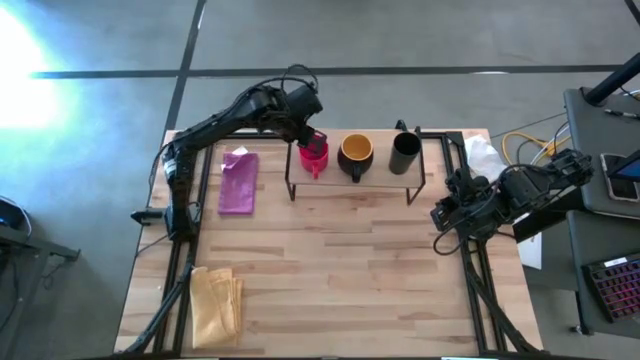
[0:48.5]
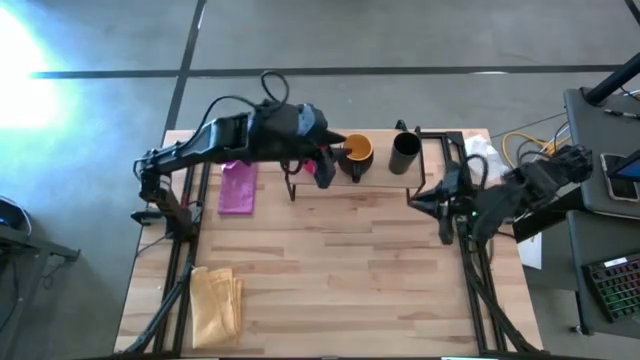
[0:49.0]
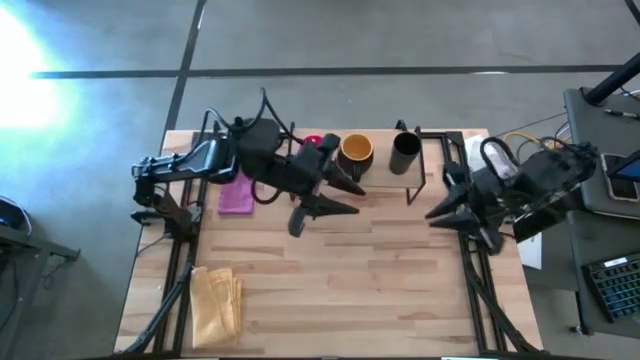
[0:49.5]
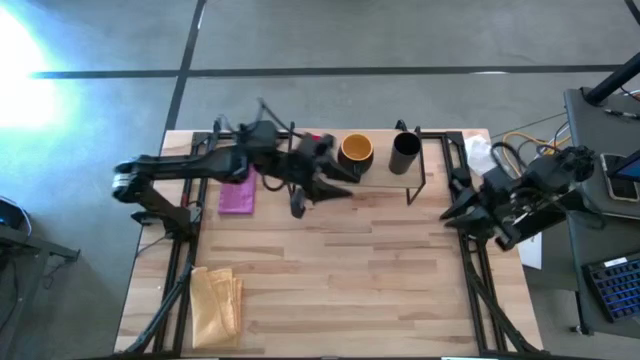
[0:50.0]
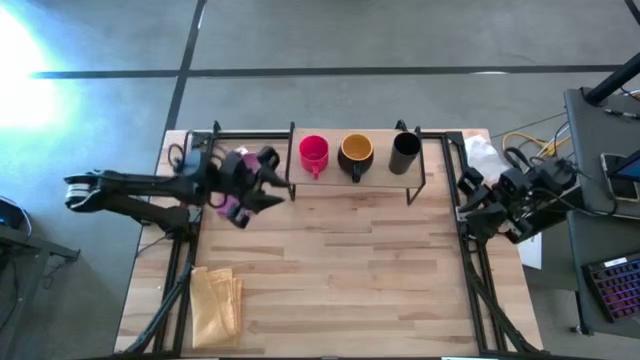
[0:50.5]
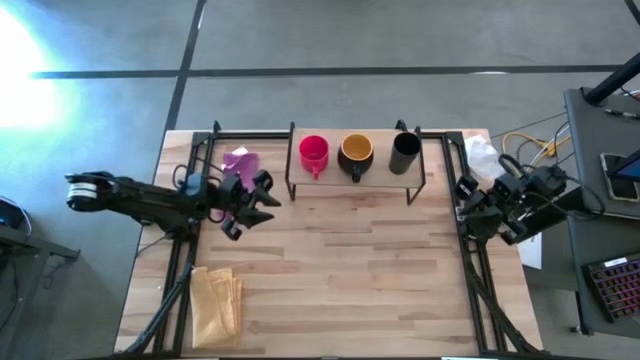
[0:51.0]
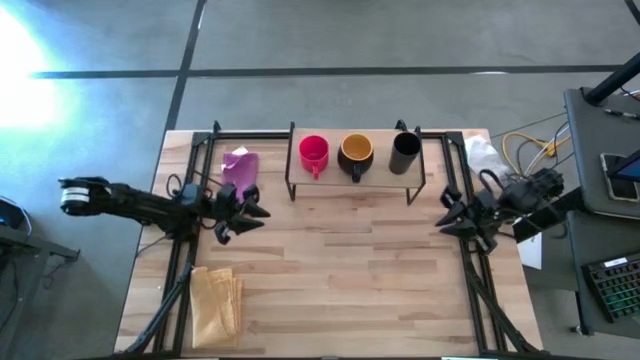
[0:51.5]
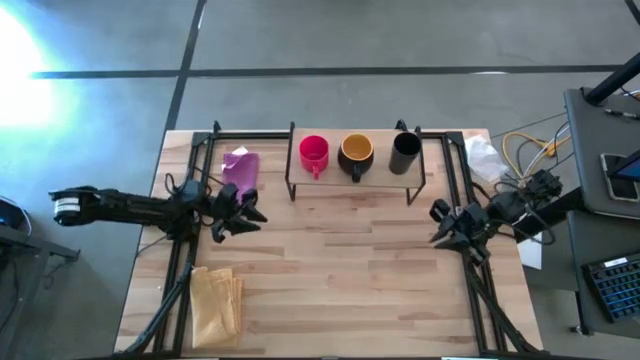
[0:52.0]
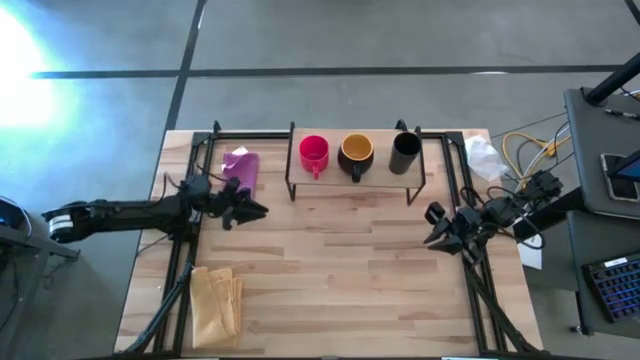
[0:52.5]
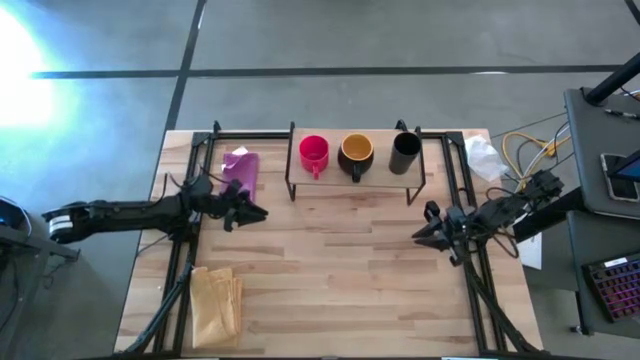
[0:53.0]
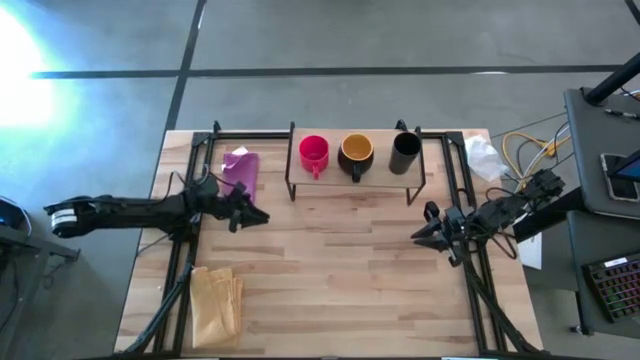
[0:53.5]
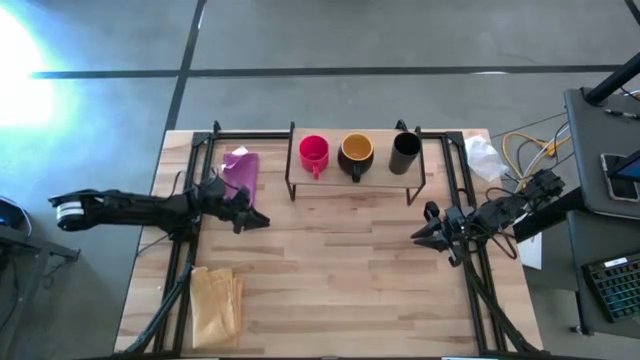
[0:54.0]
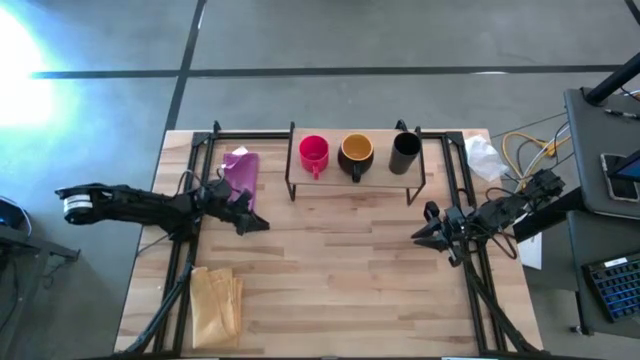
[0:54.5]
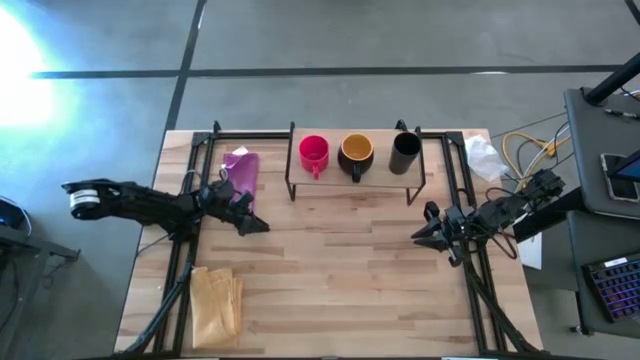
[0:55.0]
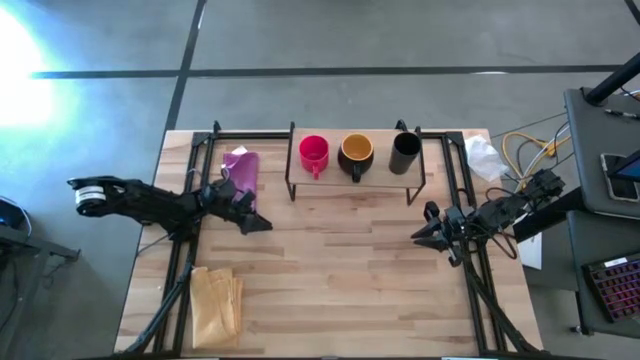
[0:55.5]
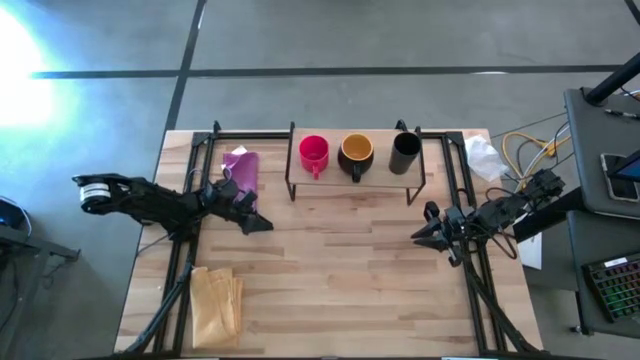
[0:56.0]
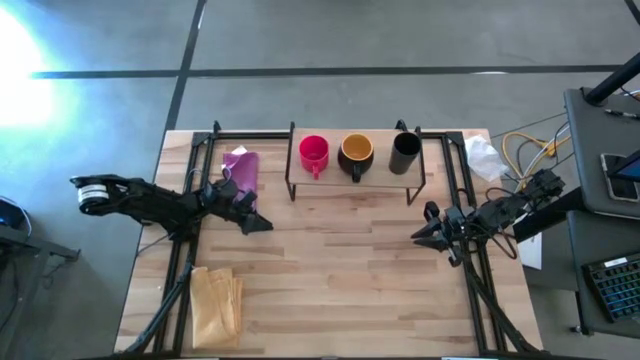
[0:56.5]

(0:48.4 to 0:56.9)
Task: Stack small to large cups/mugs on shelf
Return to Home Position

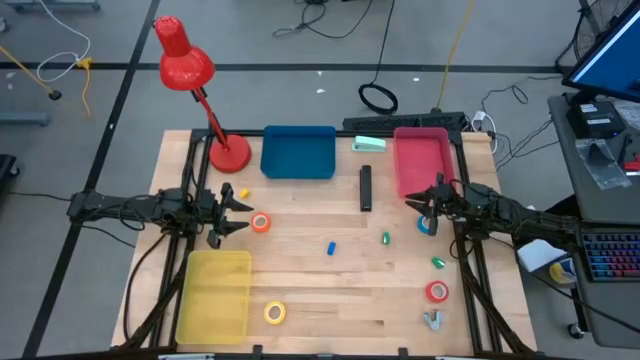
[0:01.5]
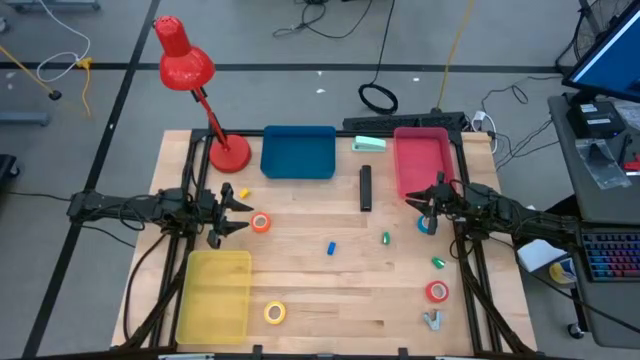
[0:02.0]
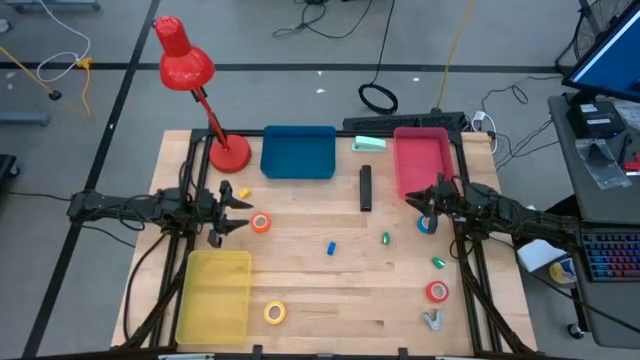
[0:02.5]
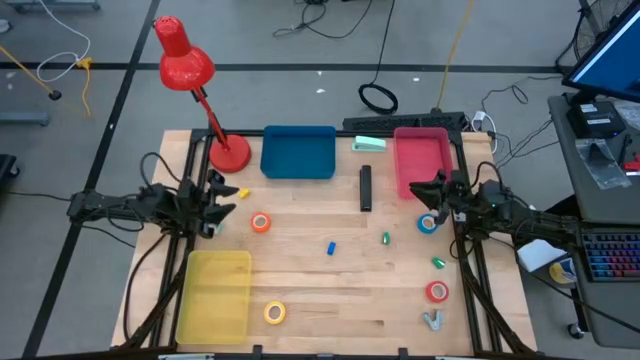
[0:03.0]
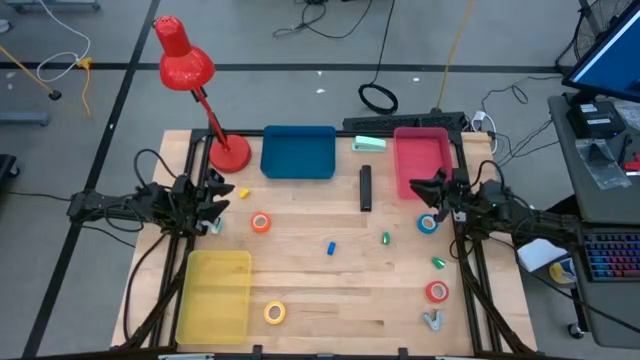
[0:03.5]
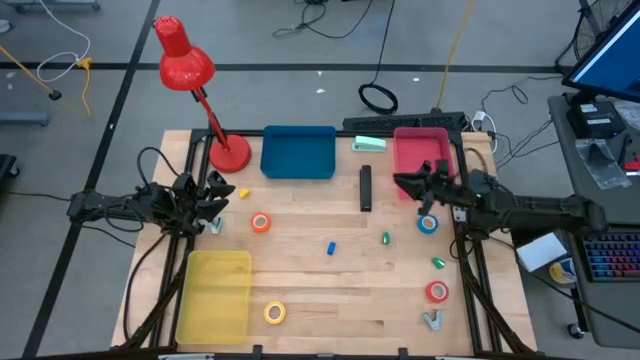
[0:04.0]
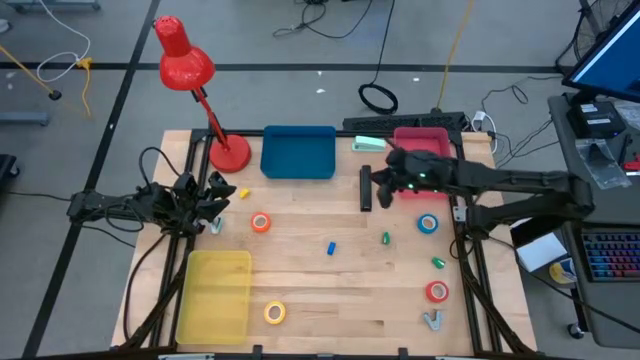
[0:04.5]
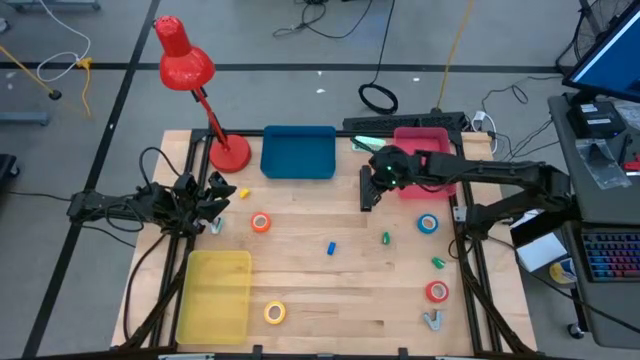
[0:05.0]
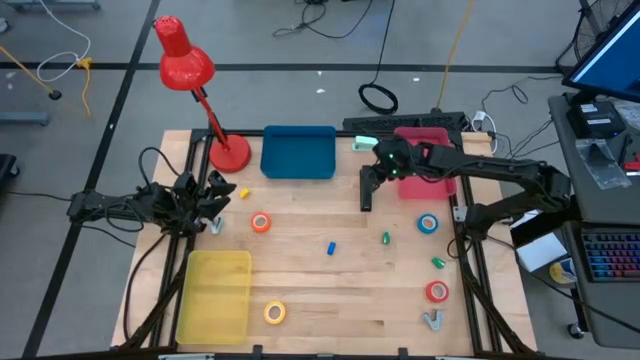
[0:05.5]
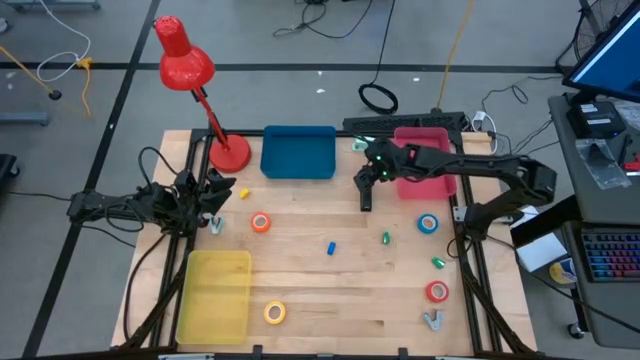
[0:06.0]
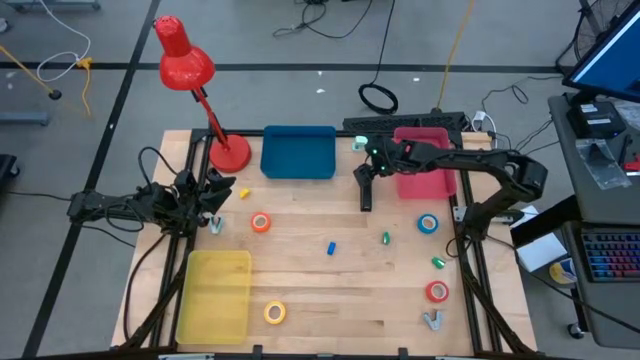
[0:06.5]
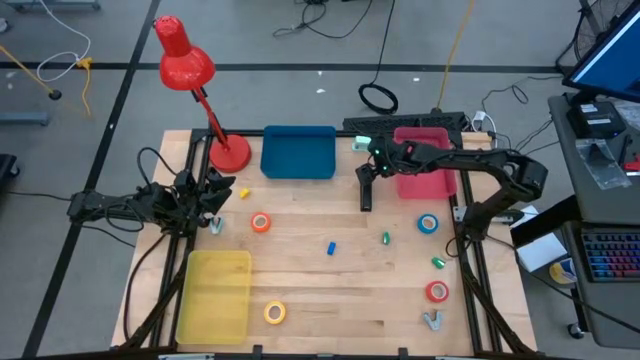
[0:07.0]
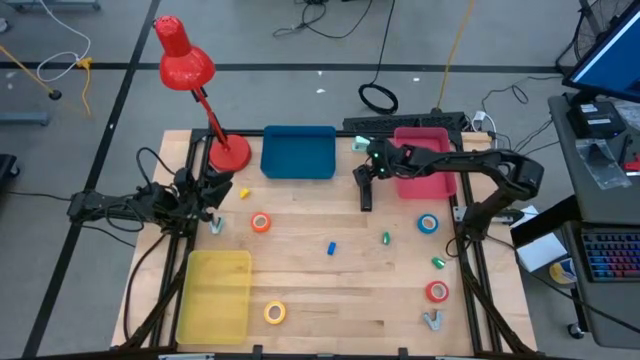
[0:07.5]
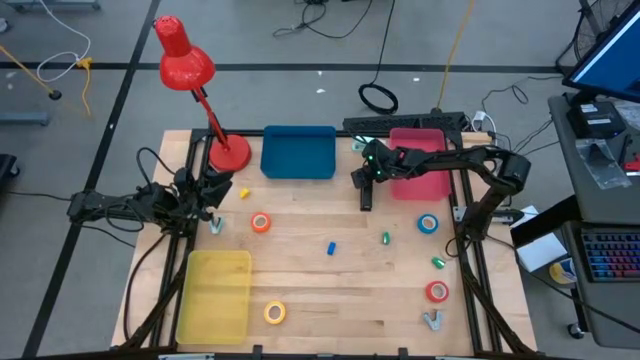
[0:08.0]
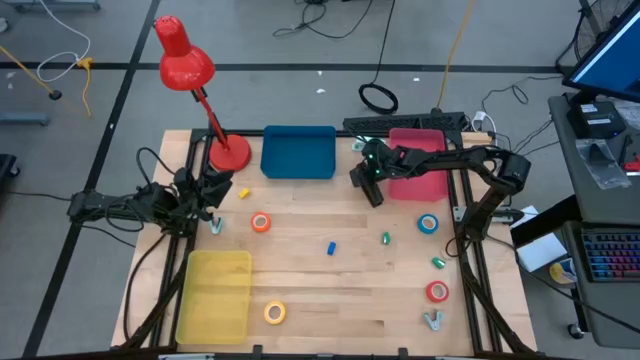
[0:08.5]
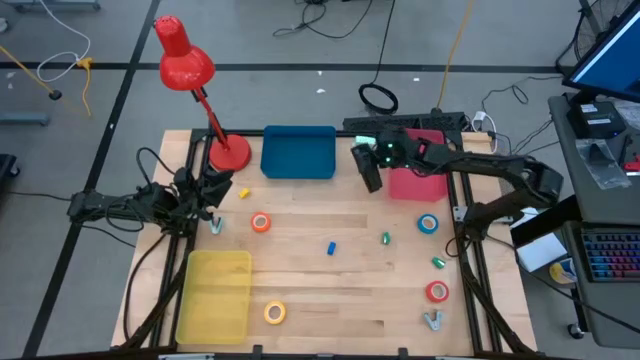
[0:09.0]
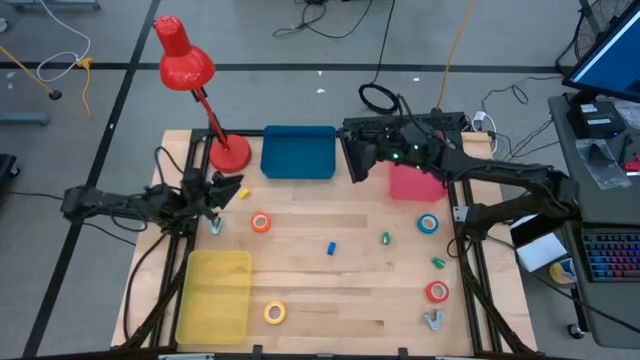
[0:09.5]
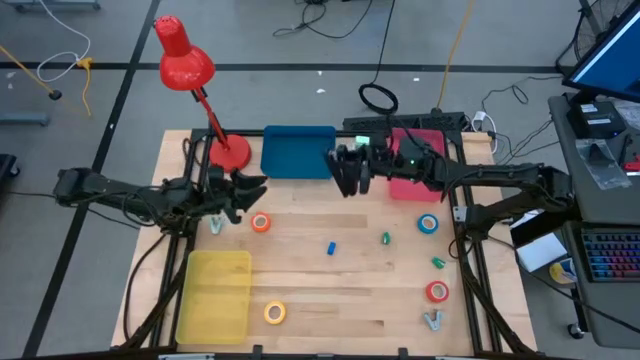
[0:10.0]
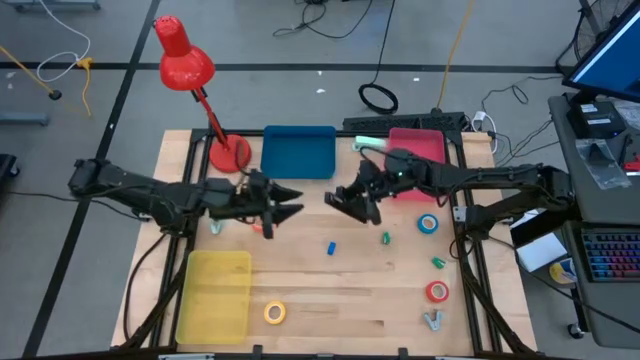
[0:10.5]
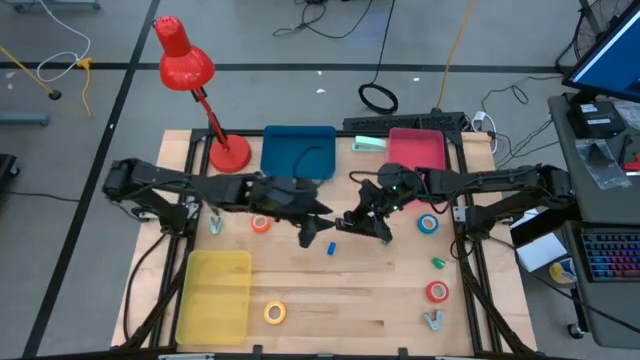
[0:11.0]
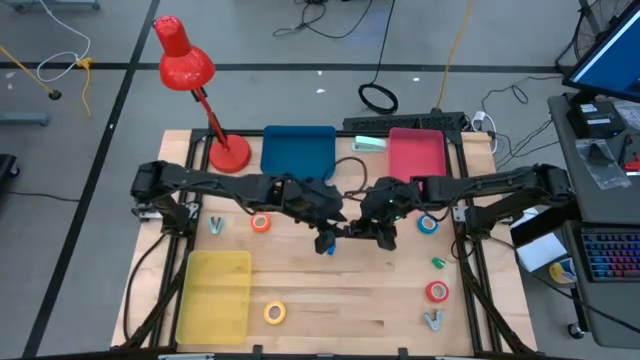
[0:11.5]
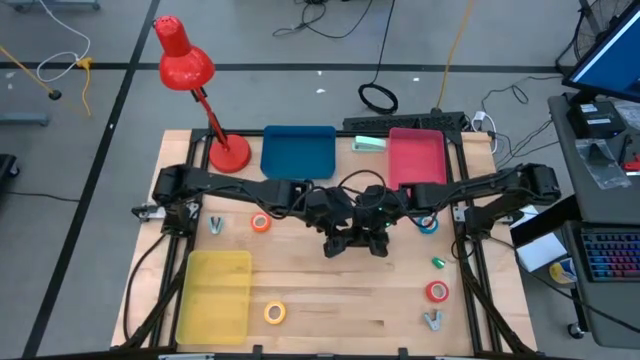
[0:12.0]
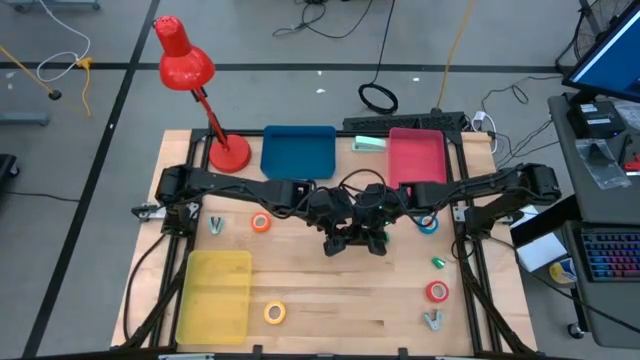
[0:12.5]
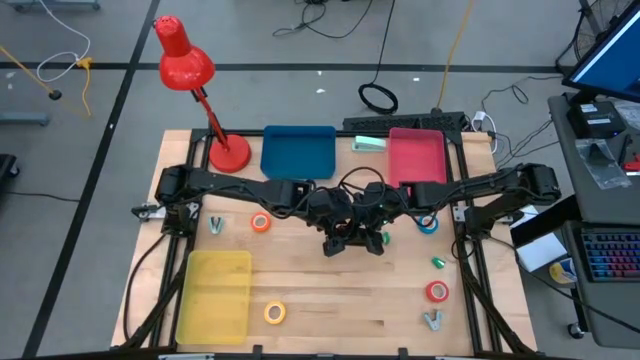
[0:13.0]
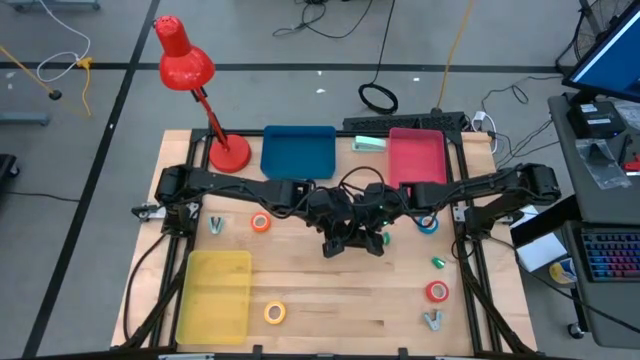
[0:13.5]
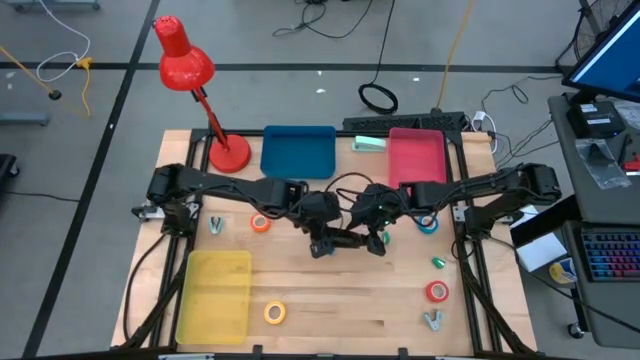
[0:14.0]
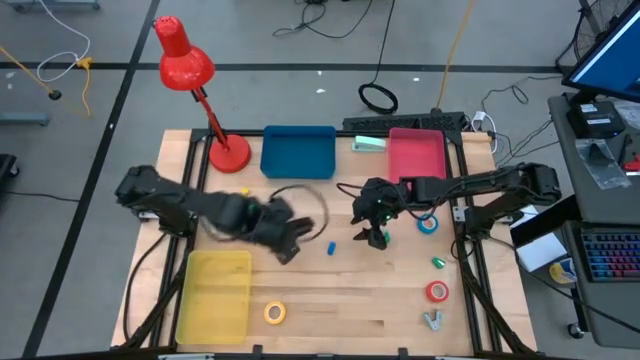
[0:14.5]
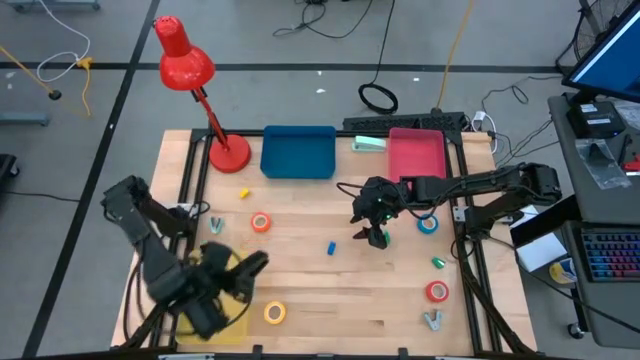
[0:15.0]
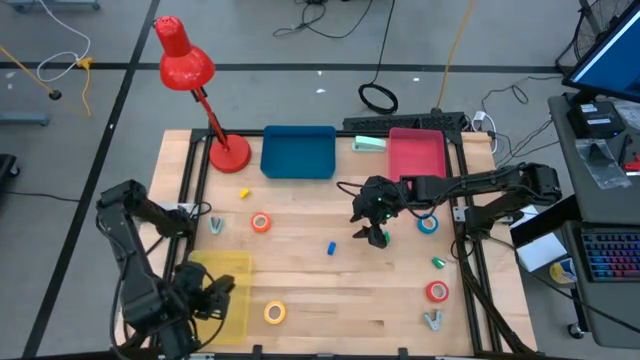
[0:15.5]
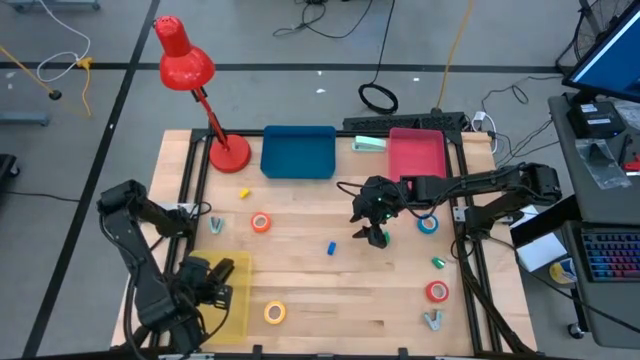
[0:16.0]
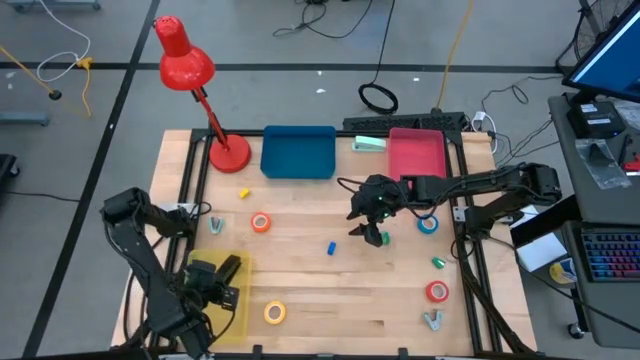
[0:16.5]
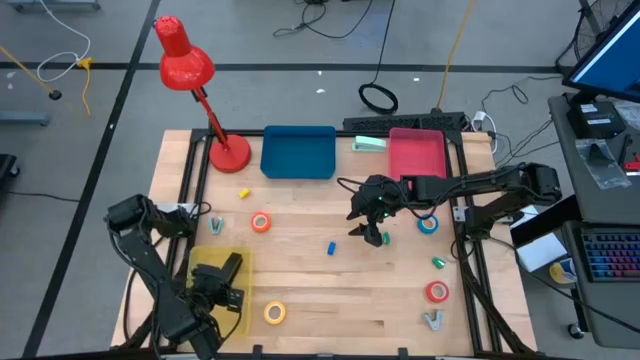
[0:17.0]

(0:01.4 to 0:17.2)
Task: Pick and place Stapler, Stapler remover, tape
Put the black stapler into the yellow bin
